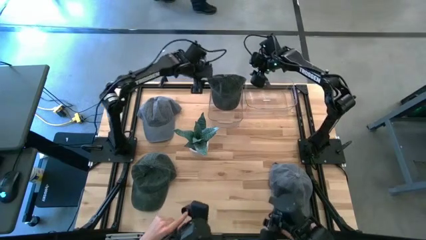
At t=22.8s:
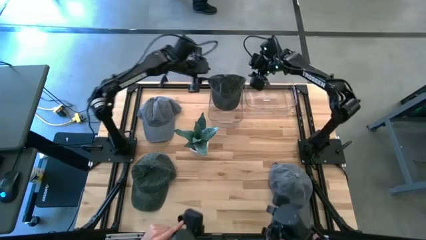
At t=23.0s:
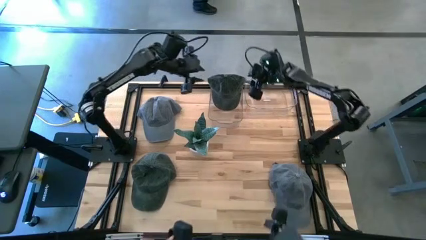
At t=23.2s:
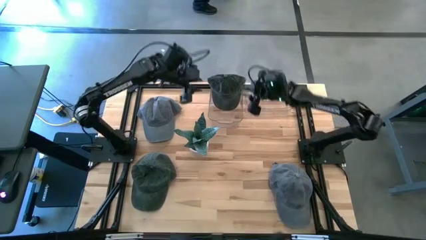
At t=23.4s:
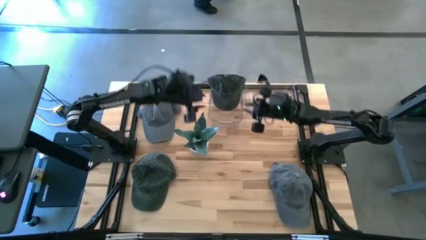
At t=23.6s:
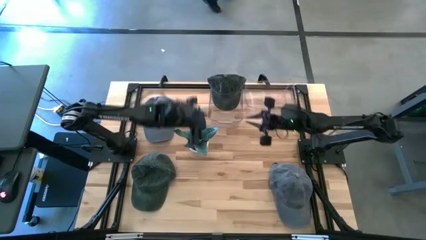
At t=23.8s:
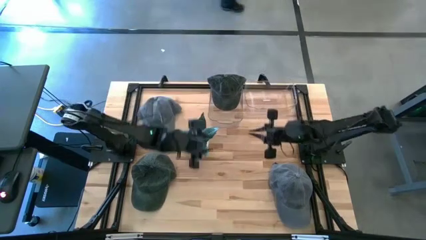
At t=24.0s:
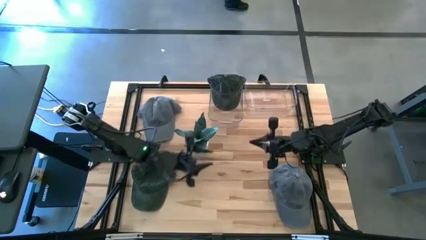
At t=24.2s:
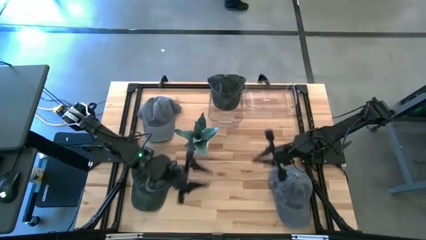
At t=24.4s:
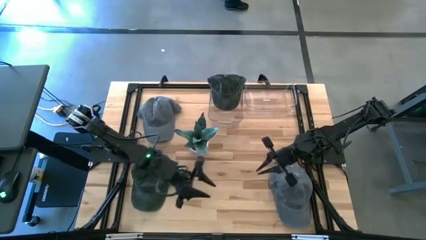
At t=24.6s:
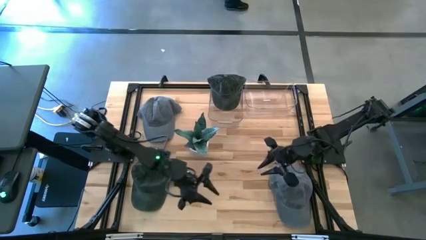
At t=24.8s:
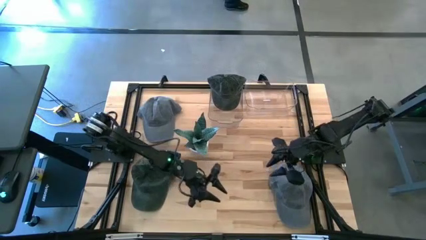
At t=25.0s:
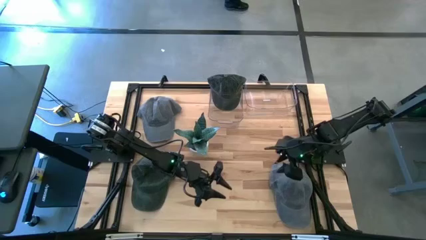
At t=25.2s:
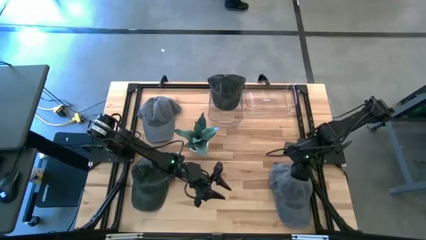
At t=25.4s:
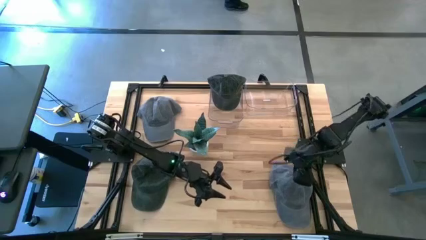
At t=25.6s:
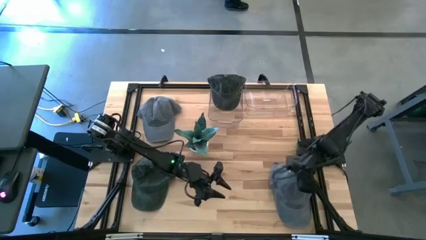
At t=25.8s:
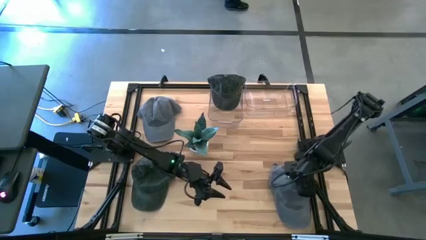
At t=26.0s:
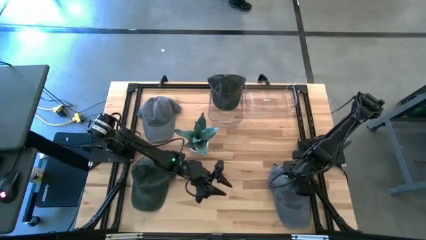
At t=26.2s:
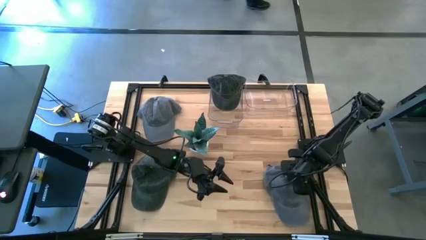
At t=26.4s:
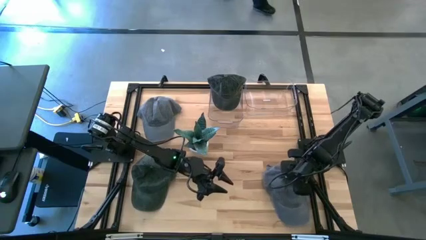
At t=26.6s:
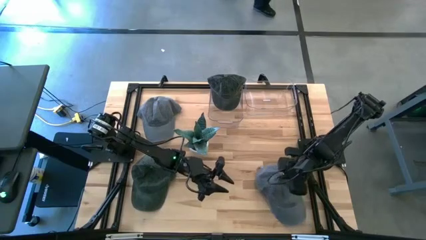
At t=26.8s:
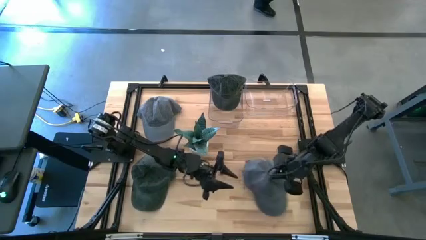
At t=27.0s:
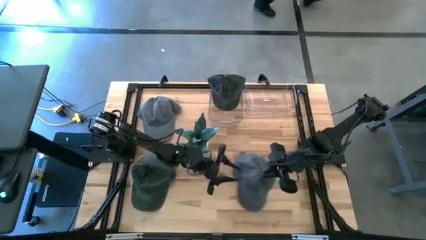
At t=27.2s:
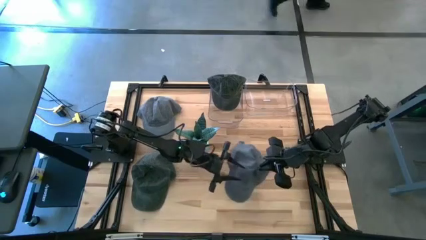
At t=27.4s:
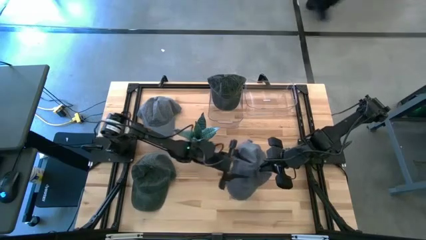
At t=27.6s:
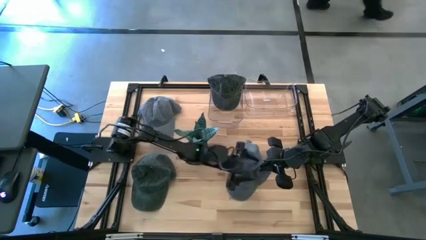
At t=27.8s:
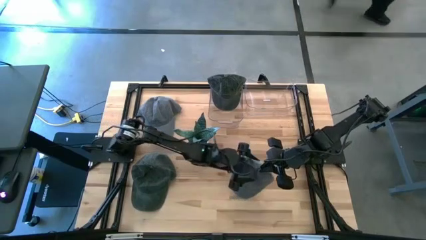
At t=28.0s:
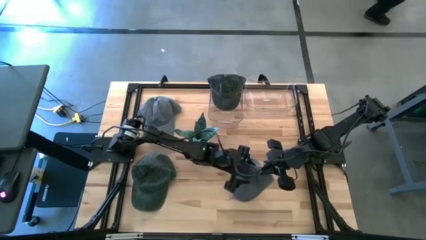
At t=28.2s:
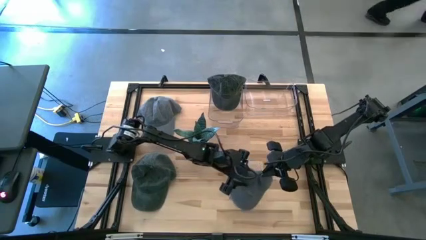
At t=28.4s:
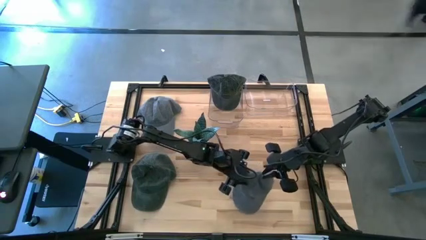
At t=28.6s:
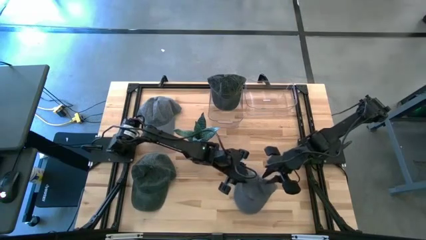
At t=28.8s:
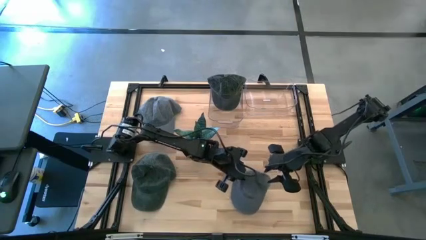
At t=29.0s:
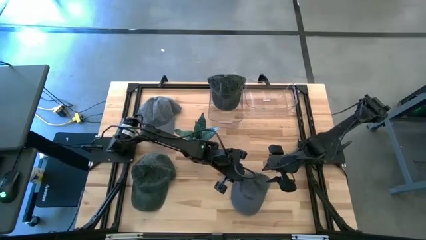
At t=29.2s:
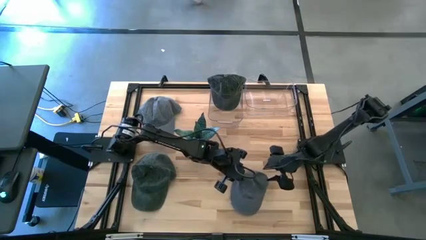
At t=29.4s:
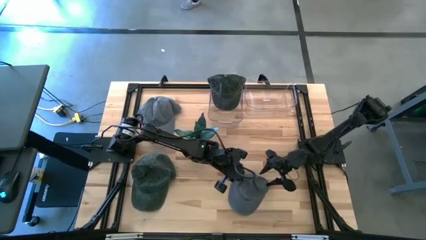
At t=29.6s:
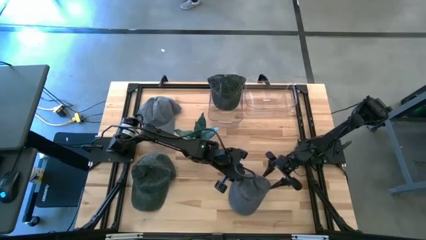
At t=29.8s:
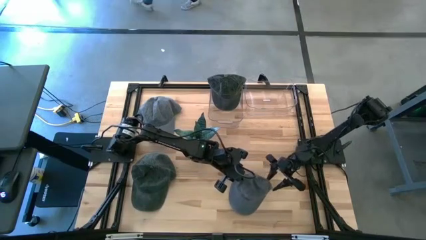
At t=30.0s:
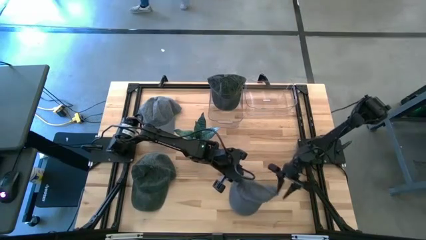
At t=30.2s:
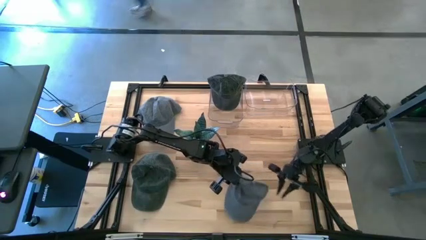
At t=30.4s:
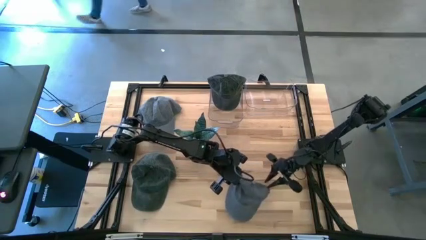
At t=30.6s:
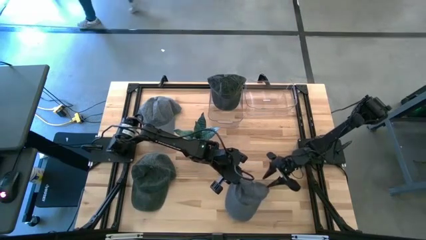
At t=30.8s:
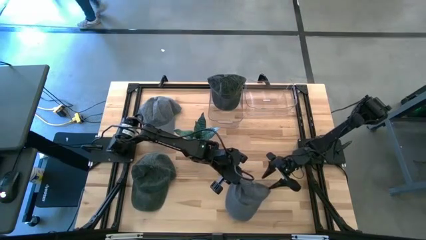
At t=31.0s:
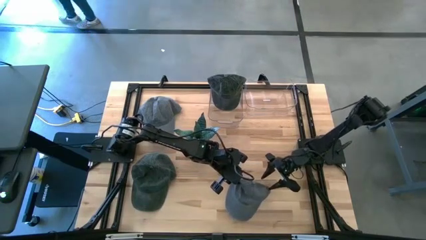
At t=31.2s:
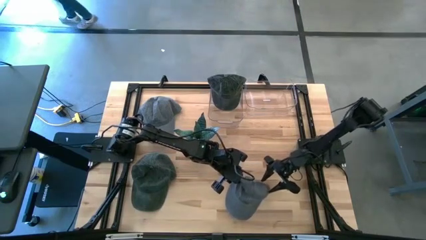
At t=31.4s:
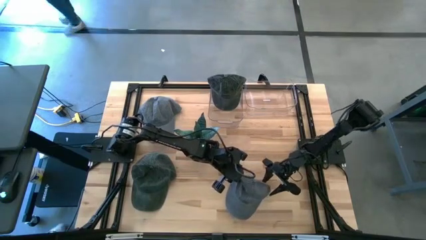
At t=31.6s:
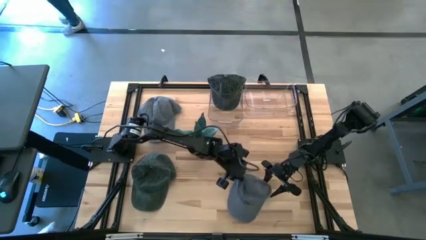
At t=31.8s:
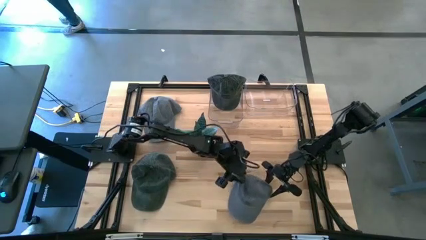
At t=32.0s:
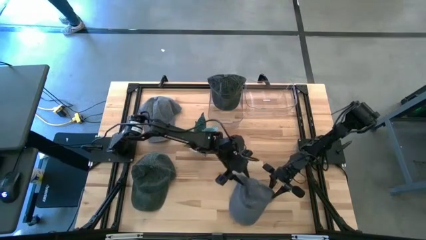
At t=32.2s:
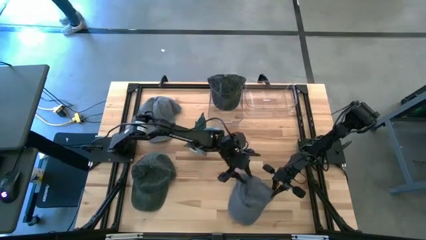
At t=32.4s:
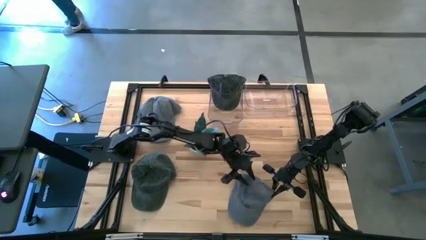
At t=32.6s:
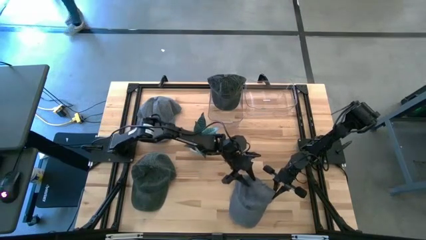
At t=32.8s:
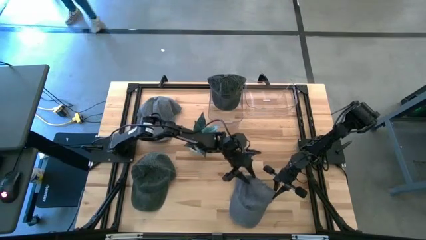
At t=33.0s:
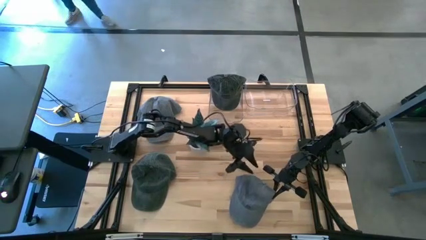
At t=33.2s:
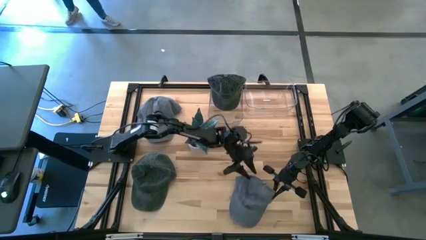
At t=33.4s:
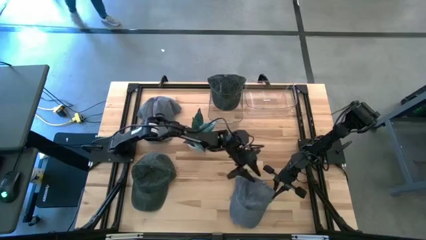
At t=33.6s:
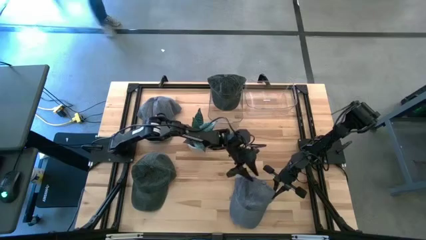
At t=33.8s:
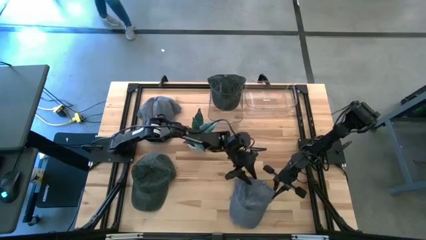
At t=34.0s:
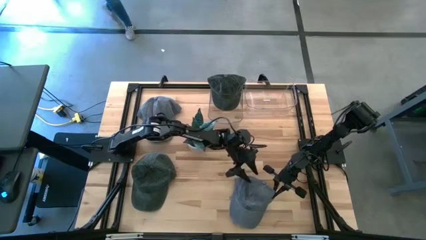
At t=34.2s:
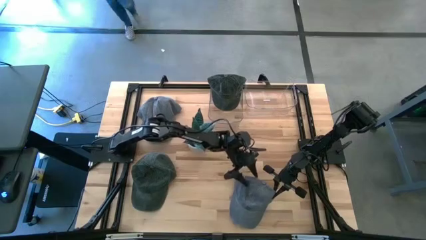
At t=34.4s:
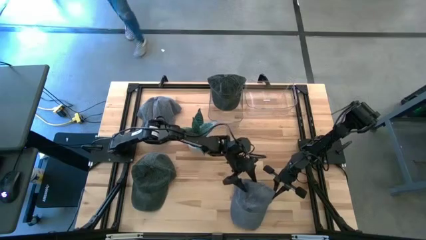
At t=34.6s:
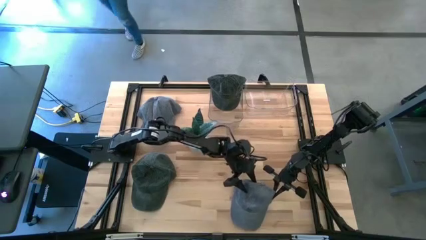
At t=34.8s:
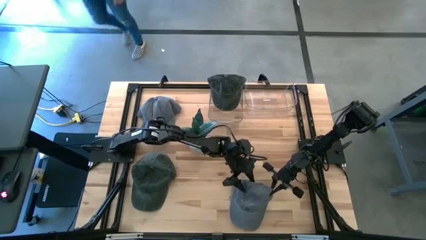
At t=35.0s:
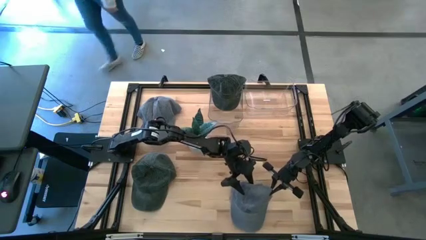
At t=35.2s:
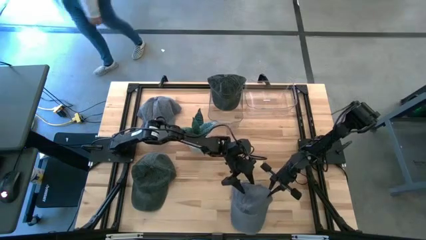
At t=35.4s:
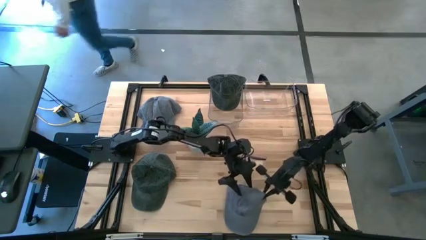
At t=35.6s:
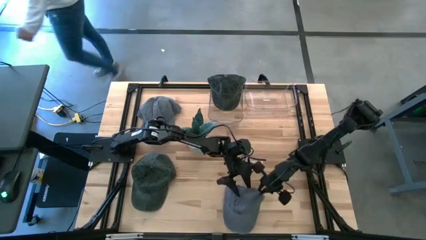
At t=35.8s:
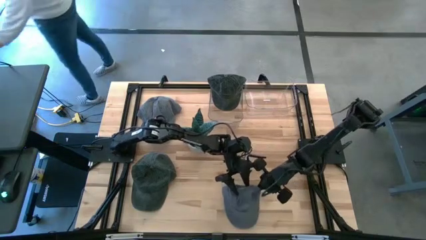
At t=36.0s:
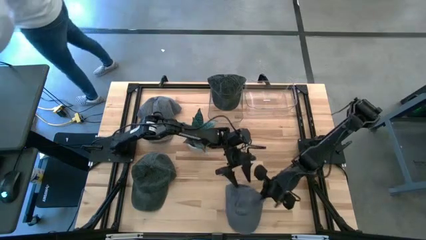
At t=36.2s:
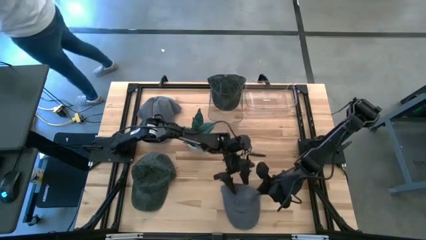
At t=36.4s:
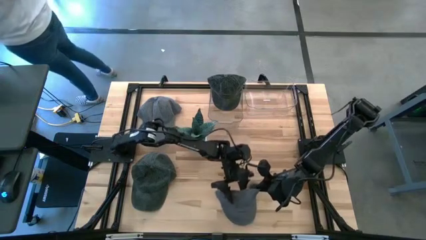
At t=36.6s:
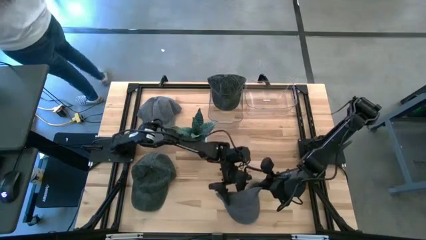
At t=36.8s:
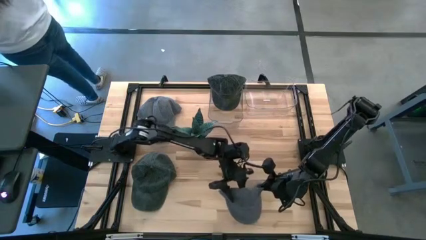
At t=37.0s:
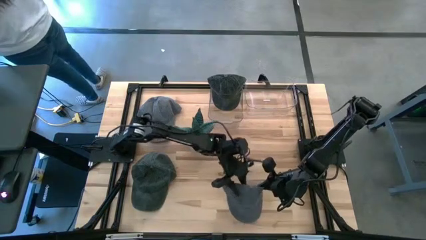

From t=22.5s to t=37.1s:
Task: Pick & Place hat
Put the bottom gray cap into the right transparent bin
